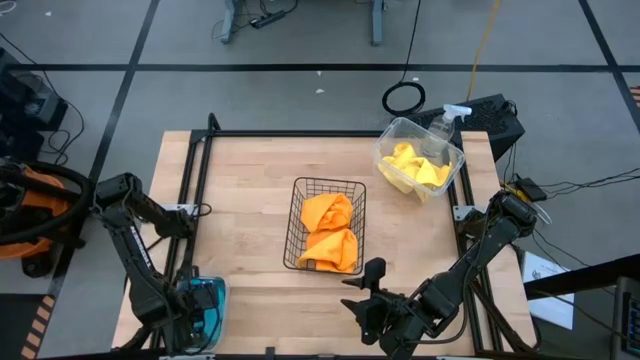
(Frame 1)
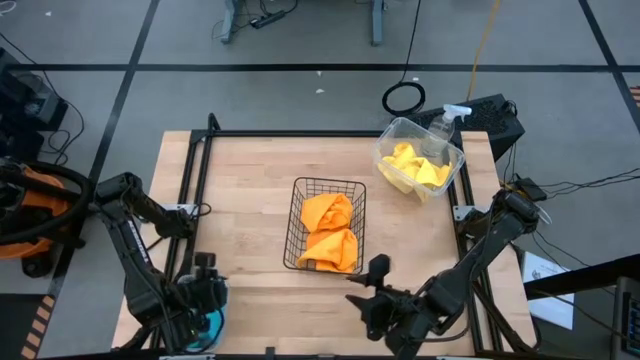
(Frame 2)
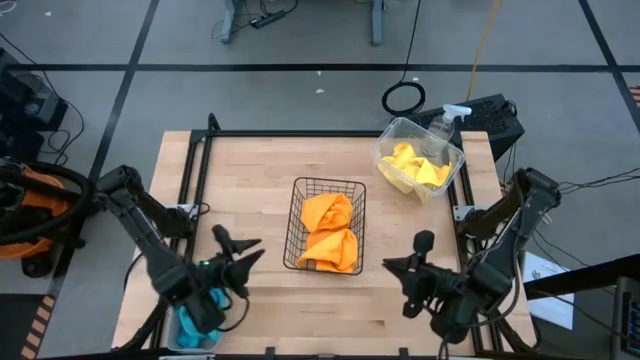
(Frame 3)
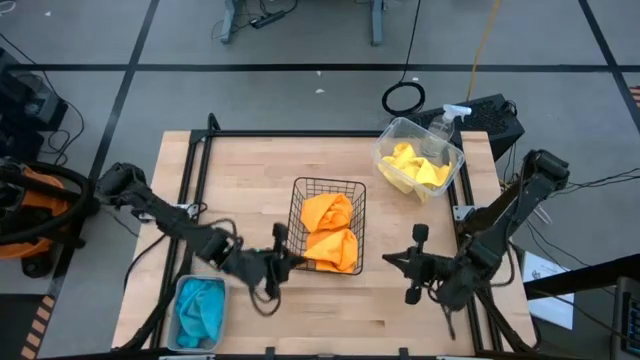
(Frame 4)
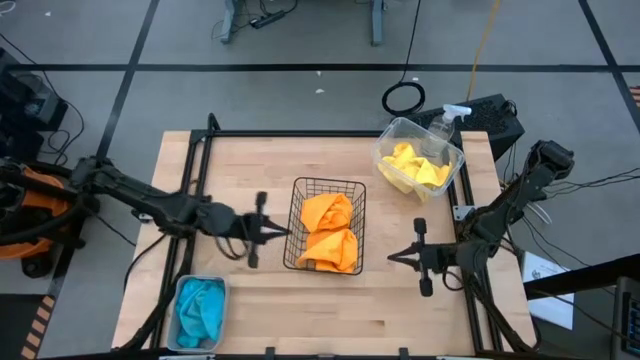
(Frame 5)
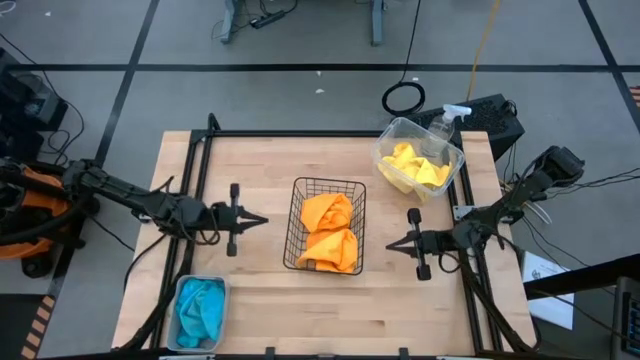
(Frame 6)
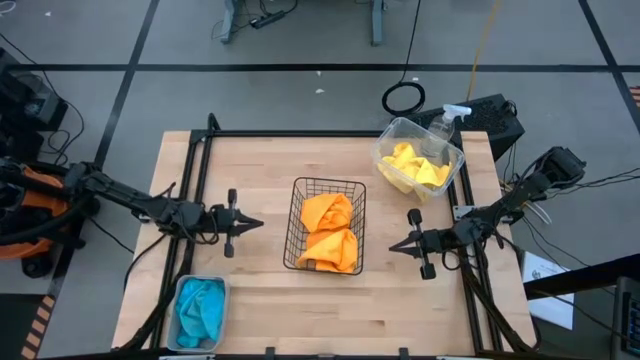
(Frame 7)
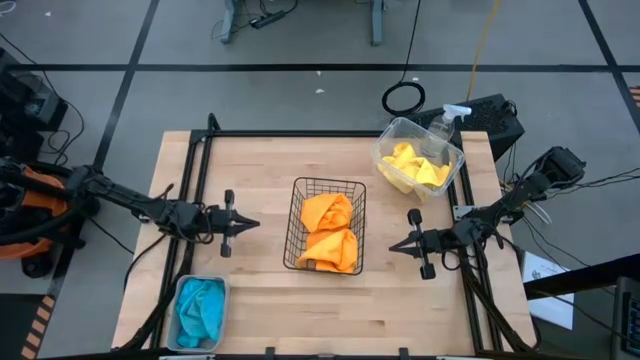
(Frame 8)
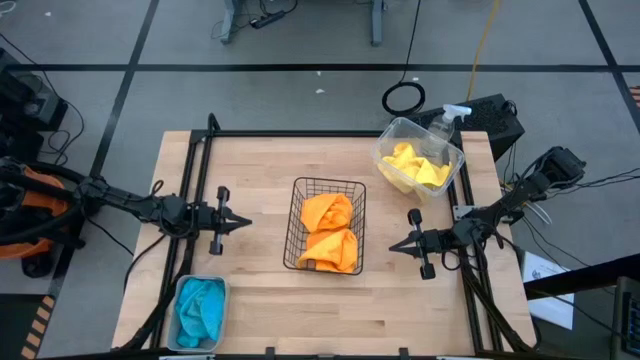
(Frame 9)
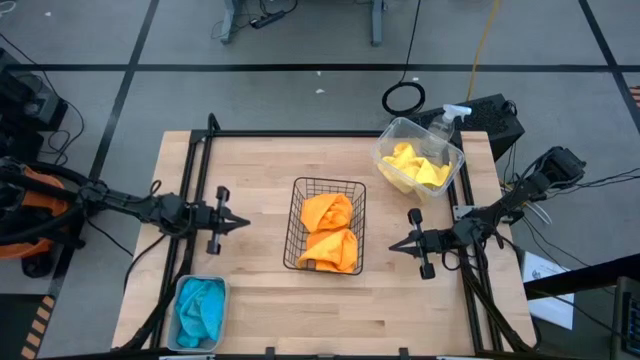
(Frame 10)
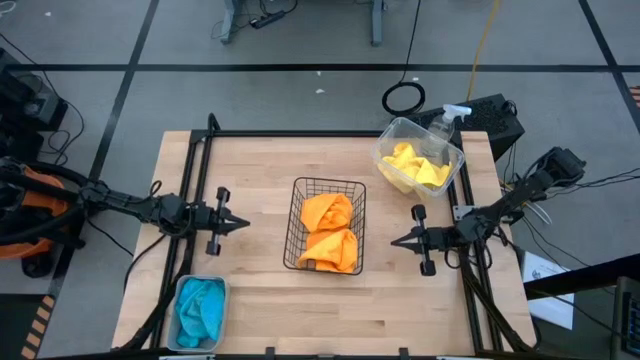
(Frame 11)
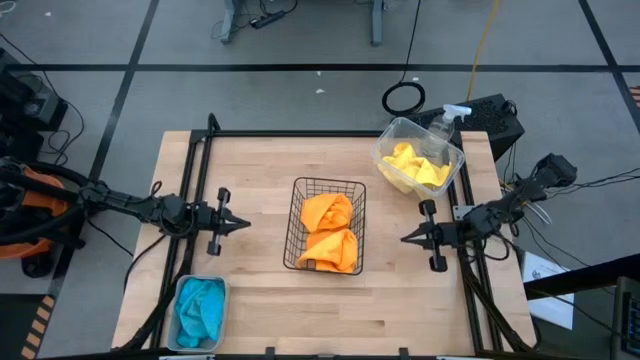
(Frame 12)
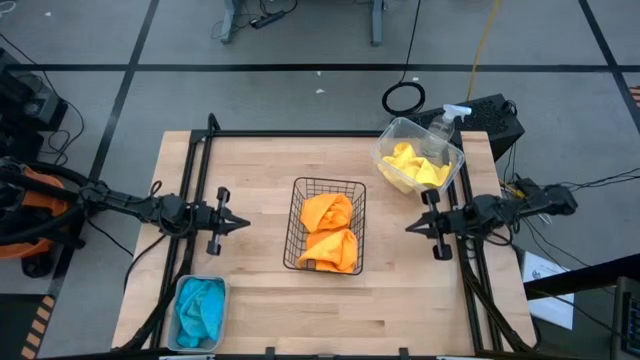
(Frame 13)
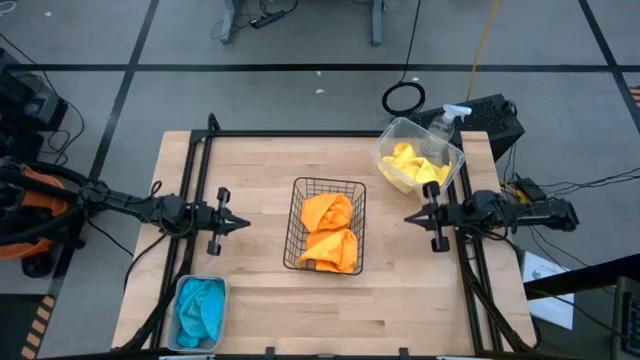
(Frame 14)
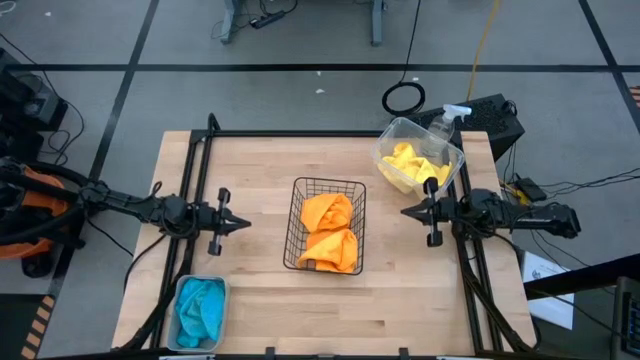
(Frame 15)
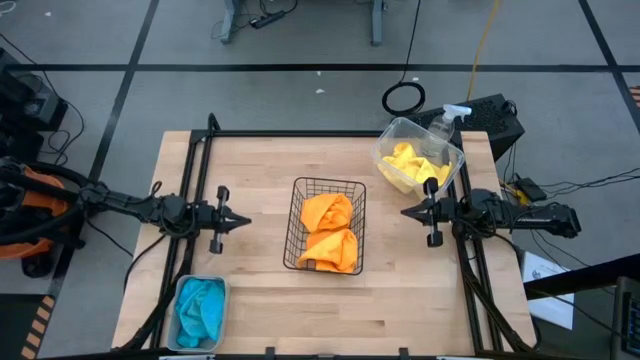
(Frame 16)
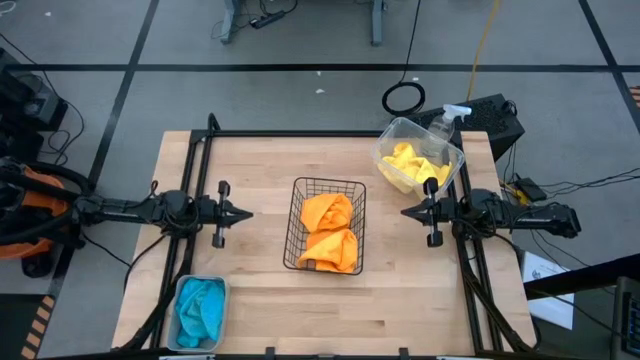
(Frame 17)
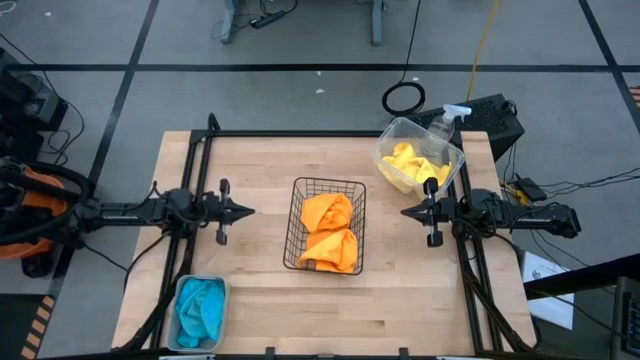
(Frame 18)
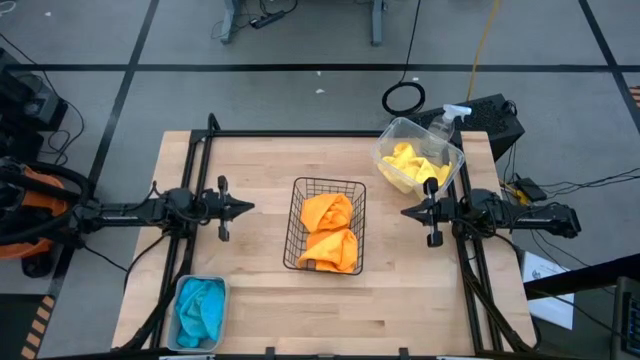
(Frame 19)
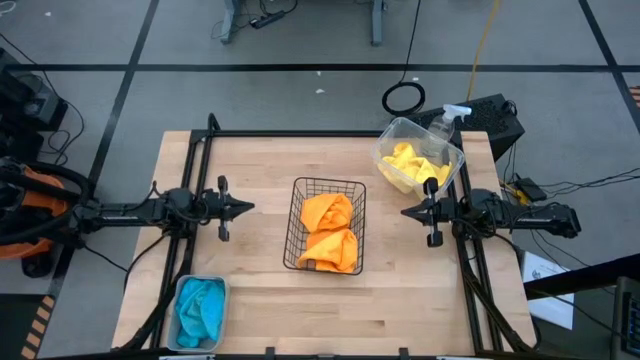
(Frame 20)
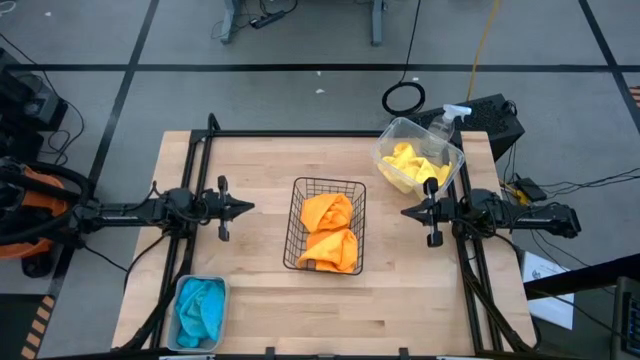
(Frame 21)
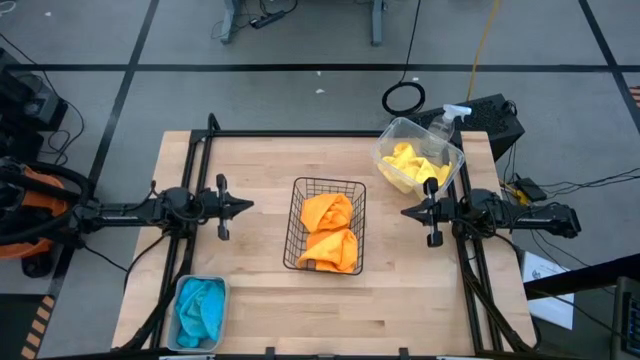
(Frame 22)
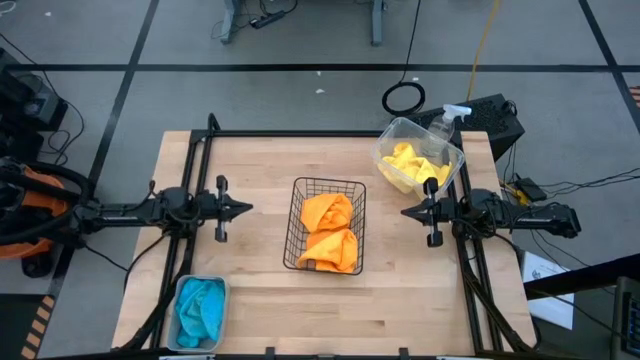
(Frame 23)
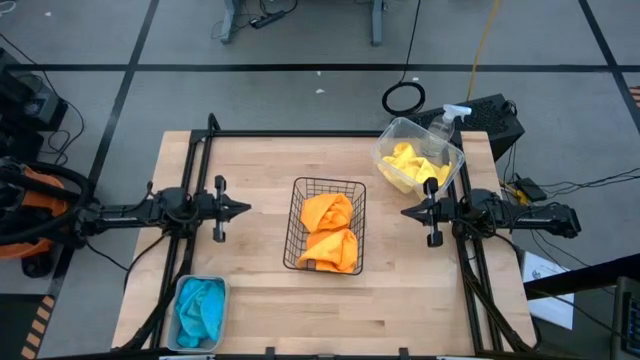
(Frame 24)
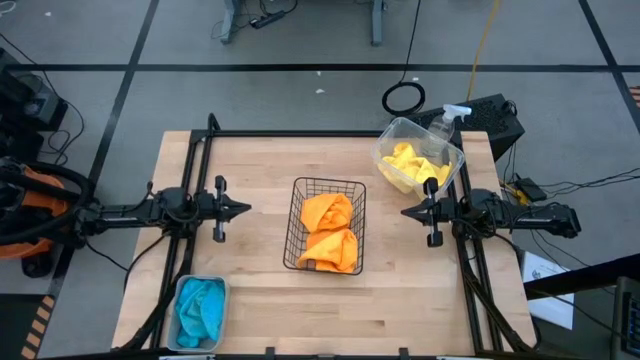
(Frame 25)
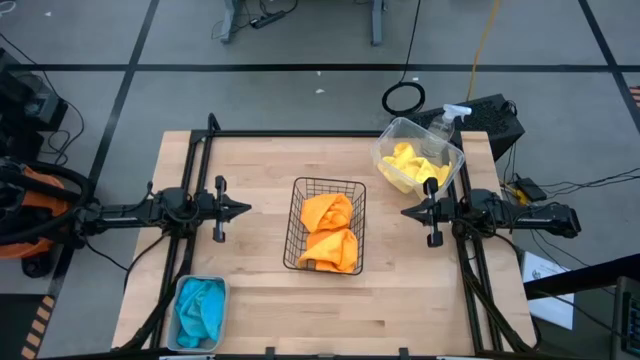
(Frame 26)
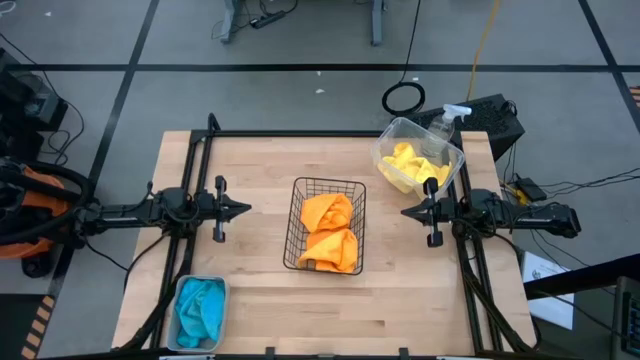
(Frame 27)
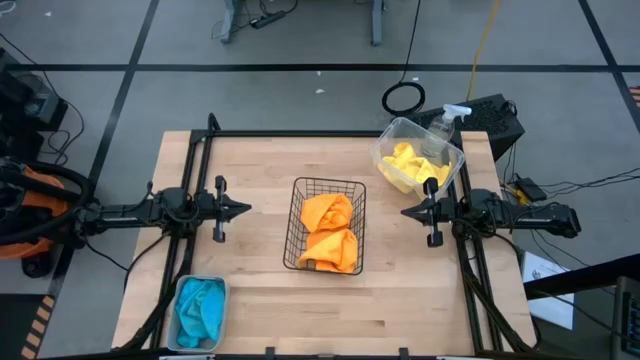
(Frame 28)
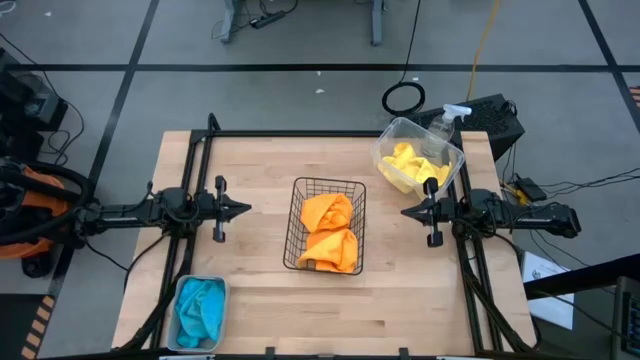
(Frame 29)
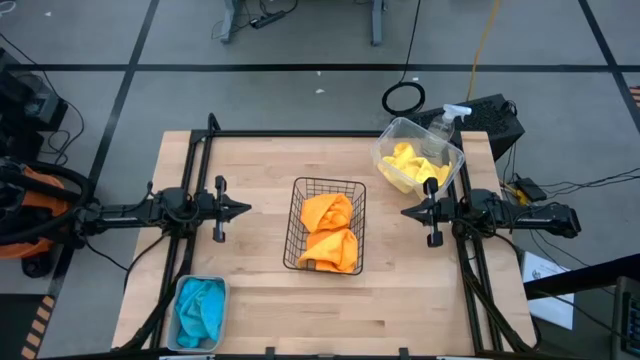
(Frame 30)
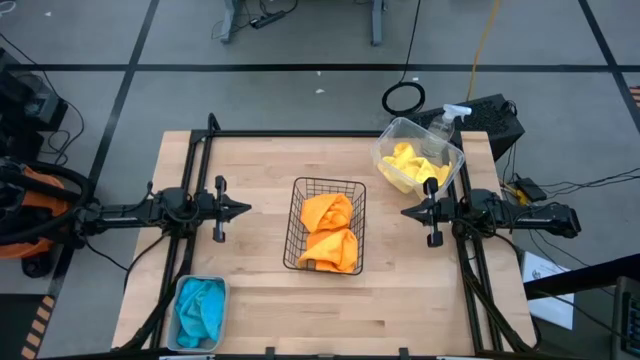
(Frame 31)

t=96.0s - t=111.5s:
Task: Sort microfiber towel by color & place in baskets
Return to Home Position

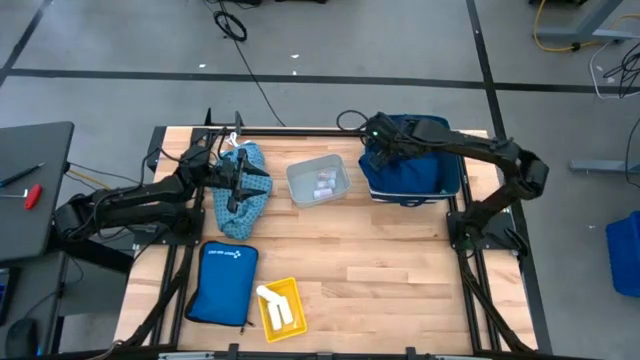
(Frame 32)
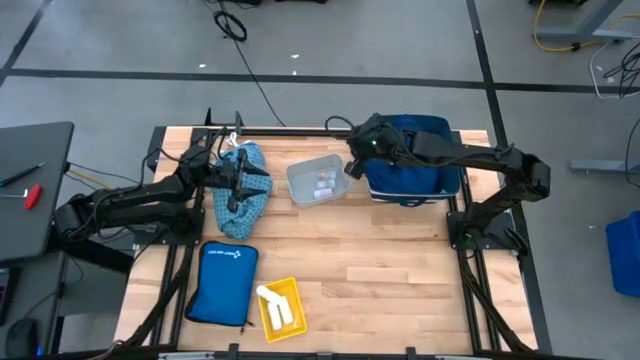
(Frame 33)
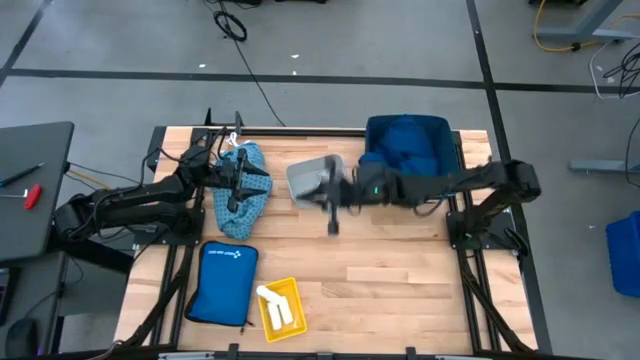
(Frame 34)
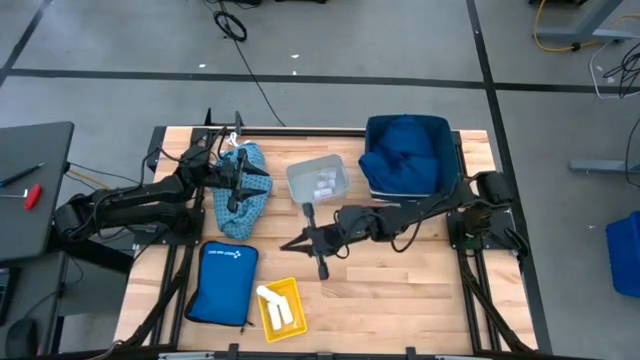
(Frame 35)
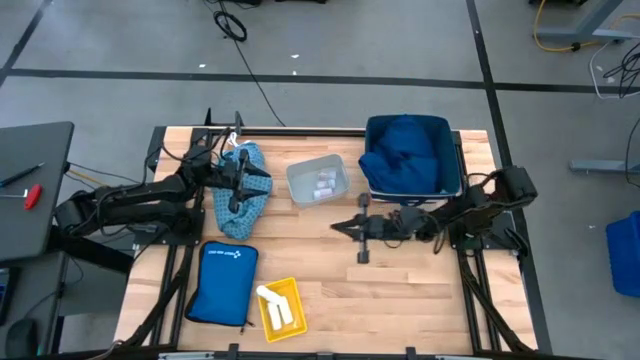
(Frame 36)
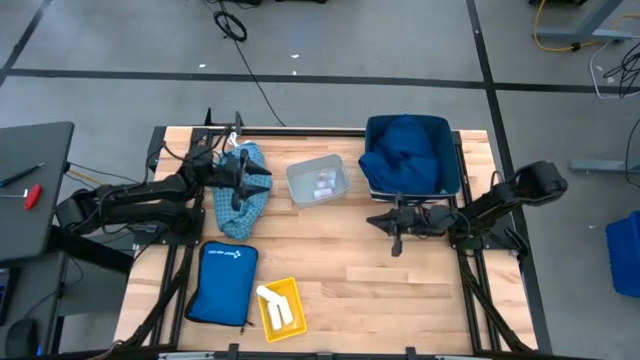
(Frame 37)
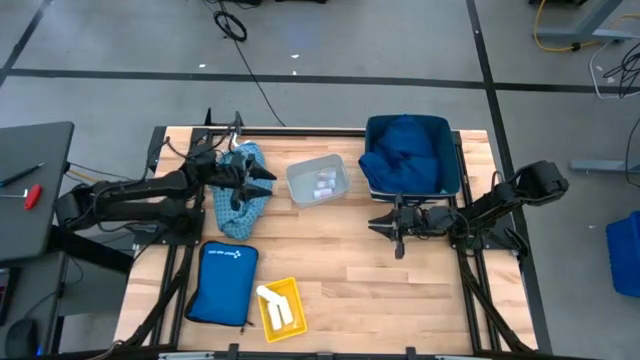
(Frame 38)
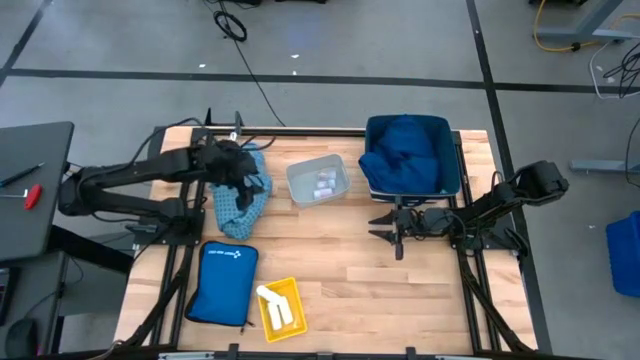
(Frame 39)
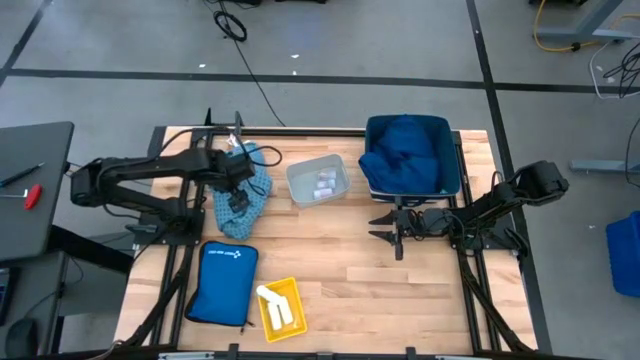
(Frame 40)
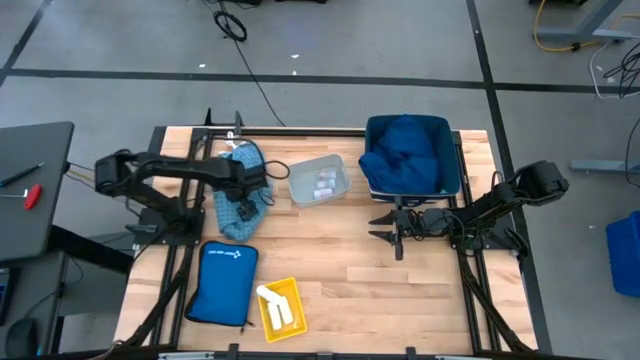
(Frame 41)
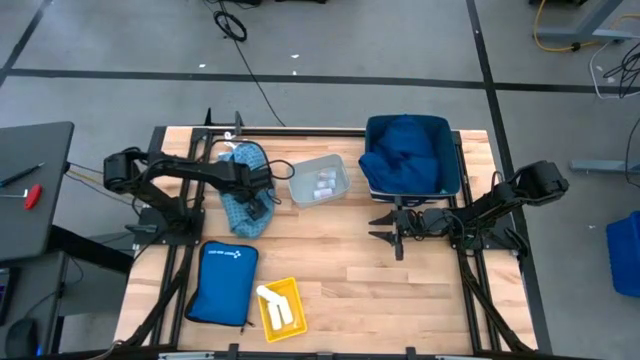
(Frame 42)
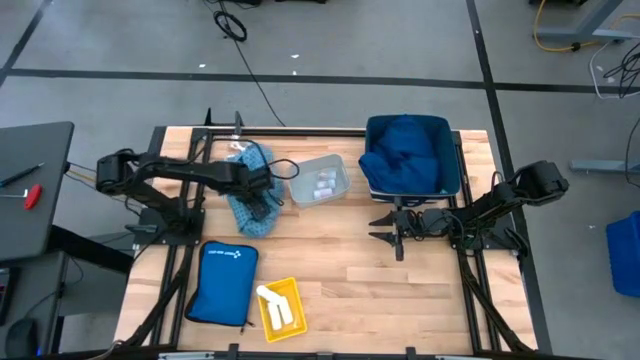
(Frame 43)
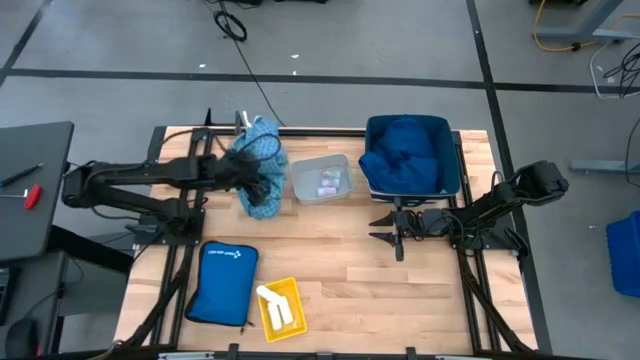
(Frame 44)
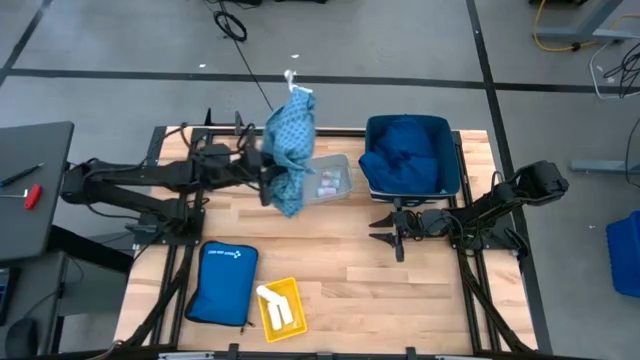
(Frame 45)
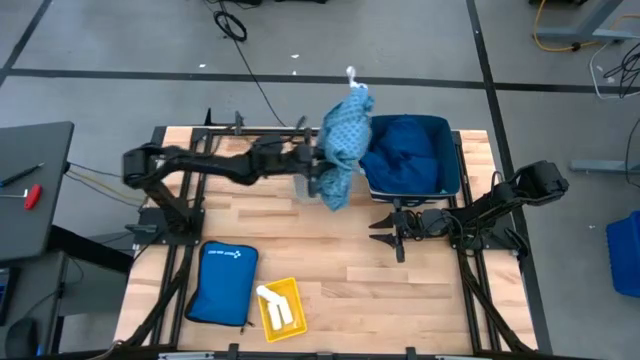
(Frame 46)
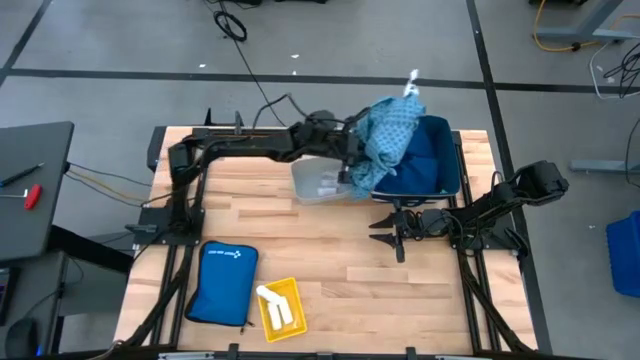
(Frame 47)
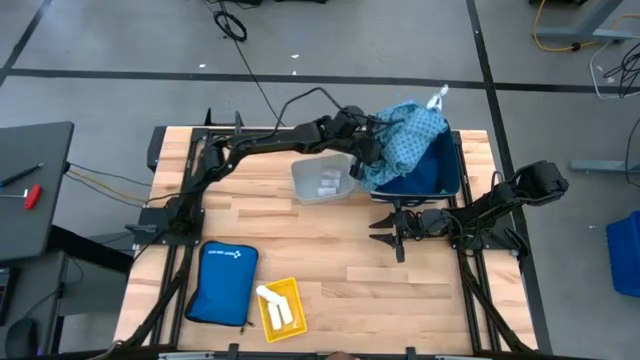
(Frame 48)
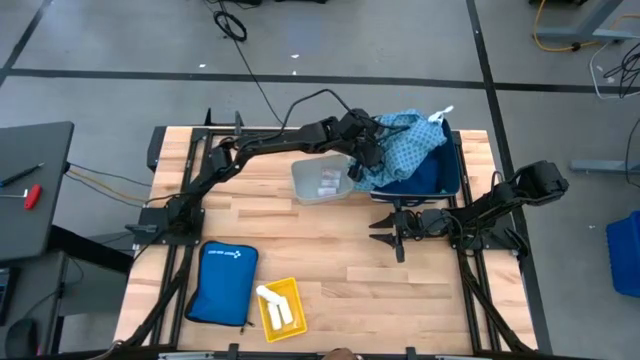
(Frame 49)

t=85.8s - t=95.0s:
Task: Pick & place medical supplies in basket/bin
Put the light blue patient gown into the blue laundry organizer
